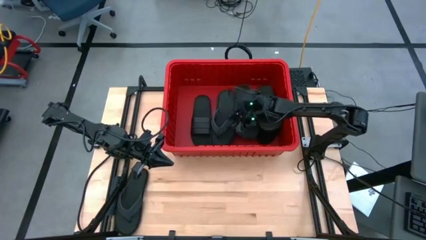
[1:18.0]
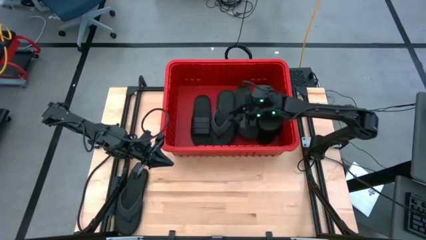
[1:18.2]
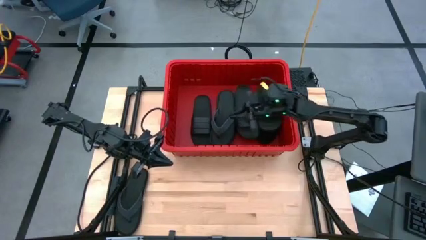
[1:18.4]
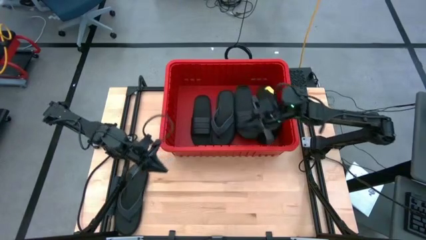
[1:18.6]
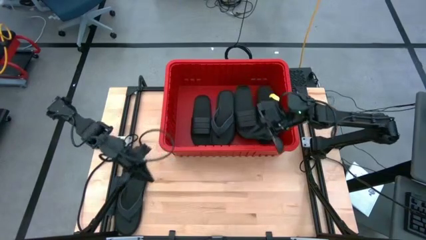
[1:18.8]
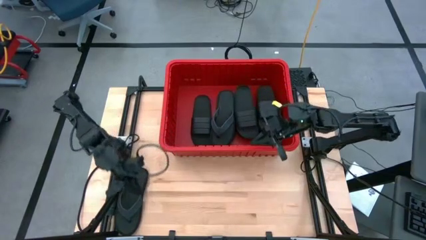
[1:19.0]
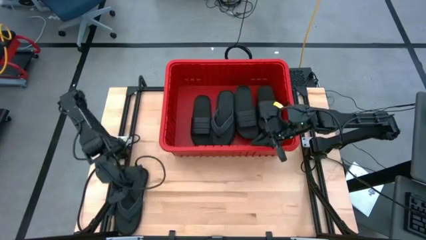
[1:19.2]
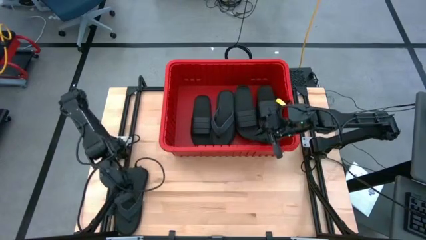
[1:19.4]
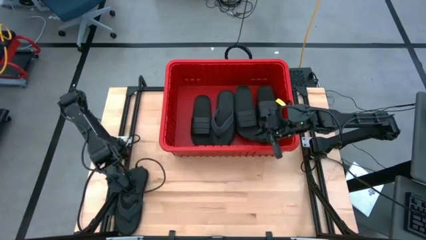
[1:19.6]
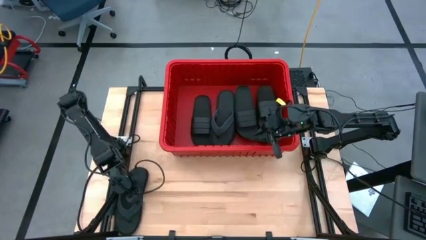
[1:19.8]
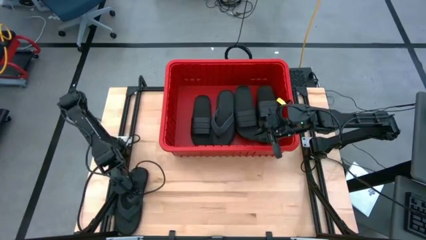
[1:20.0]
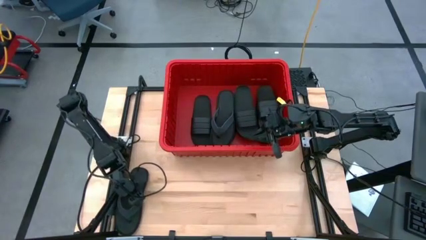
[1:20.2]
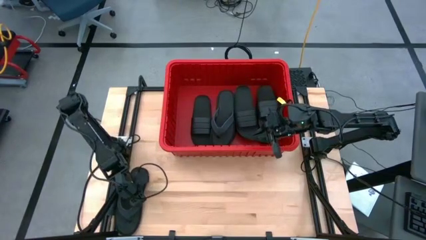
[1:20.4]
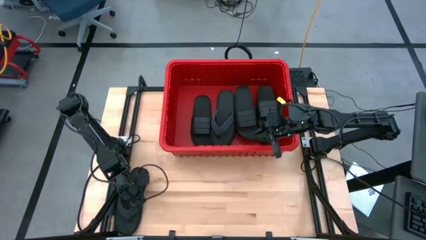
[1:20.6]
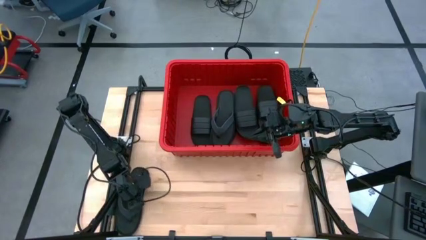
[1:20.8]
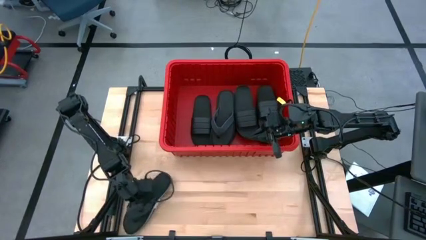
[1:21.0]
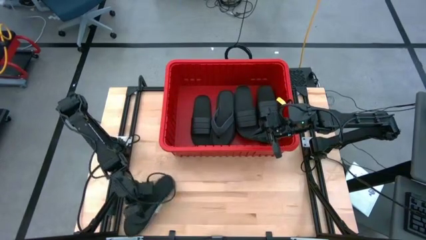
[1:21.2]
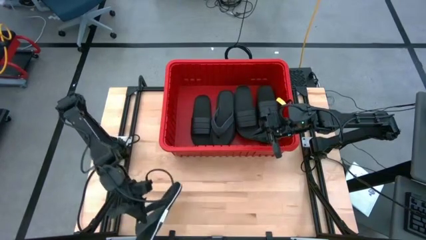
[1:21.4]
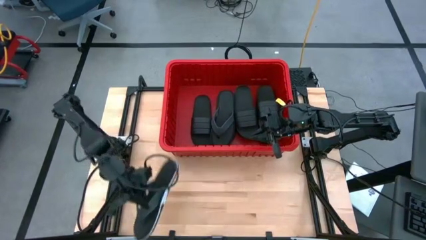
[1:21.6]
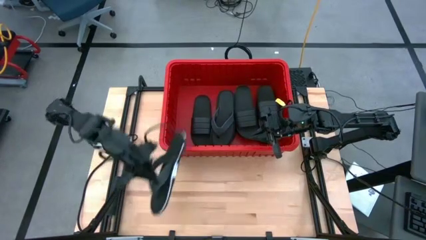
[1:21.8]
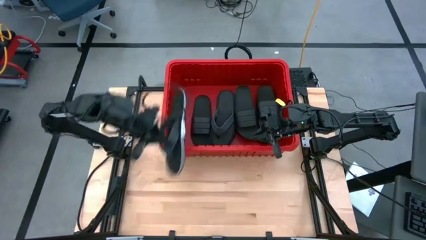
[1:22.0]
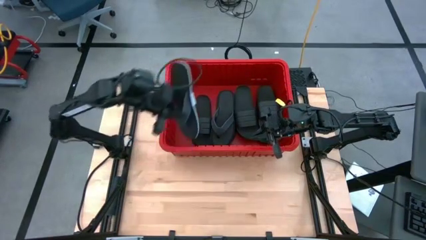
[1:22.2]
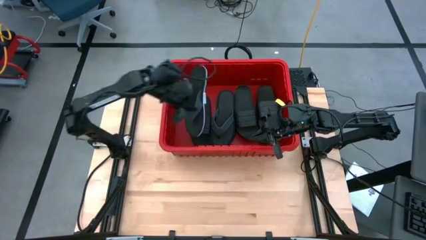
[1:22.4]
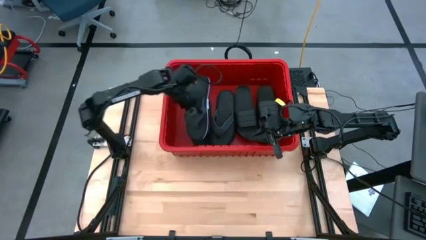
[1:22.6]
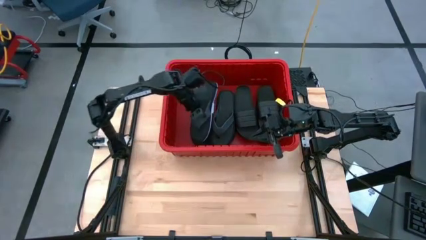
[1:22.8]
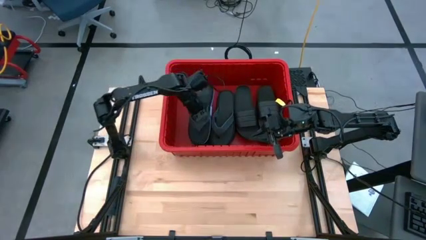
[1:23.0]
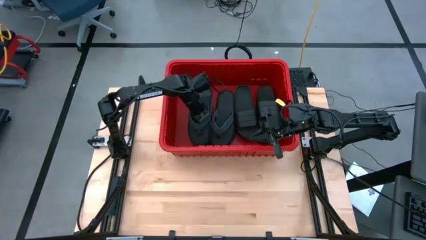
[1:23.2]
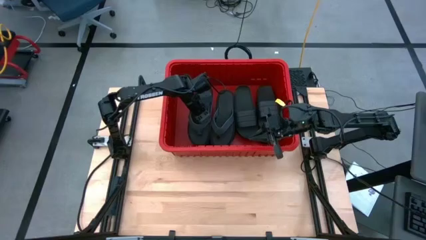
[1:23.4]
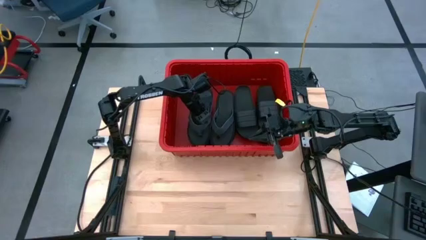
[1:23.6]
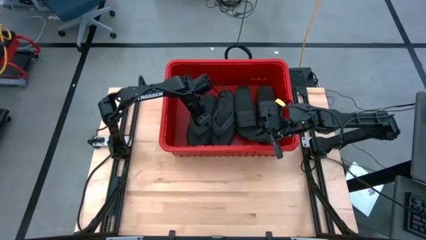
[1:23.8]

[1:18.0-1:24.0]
Task: Pick and place slides into bin
Put the black slipper into the red container

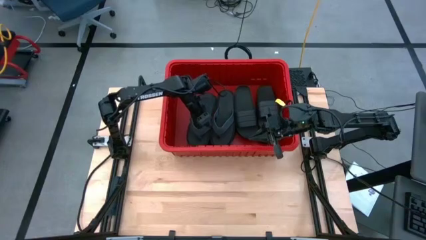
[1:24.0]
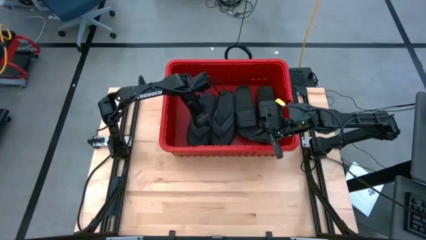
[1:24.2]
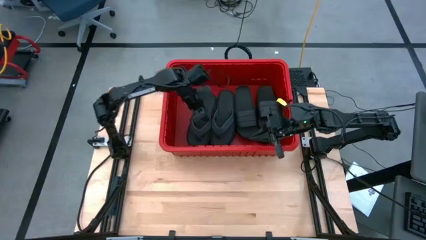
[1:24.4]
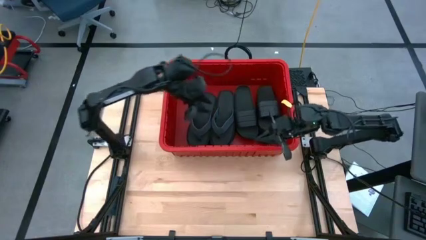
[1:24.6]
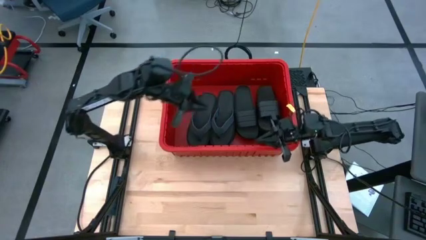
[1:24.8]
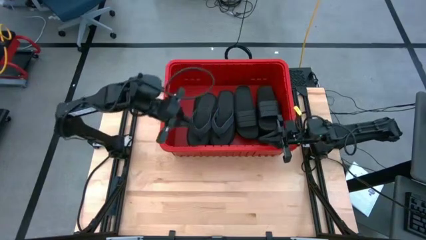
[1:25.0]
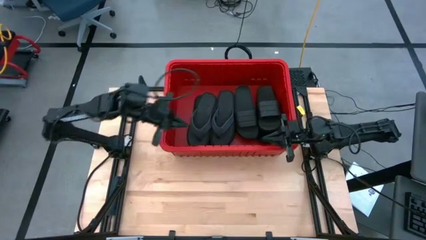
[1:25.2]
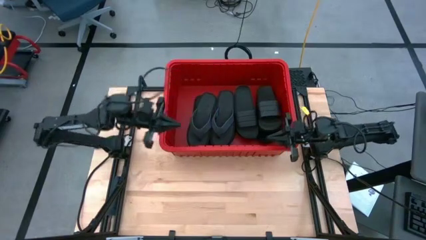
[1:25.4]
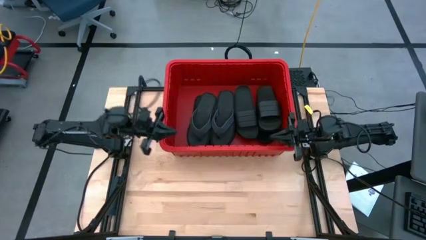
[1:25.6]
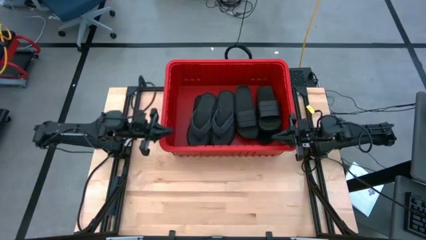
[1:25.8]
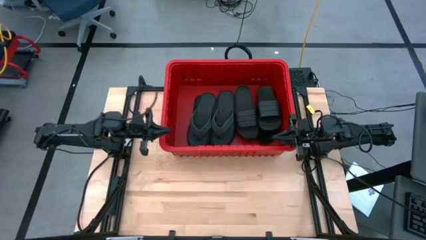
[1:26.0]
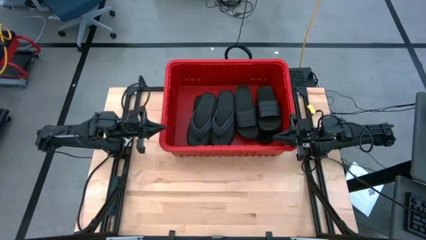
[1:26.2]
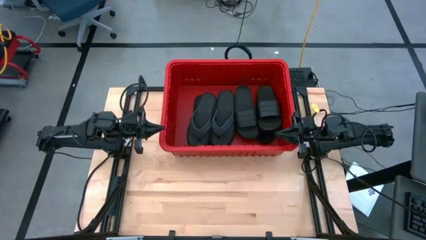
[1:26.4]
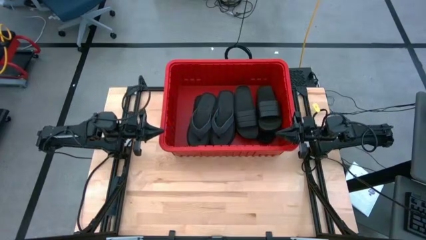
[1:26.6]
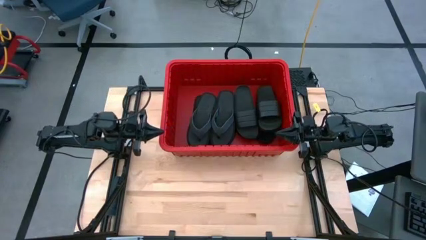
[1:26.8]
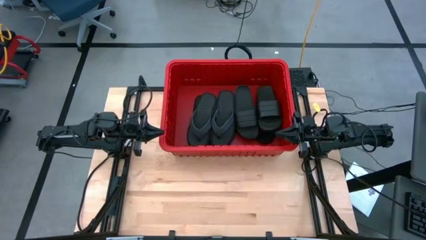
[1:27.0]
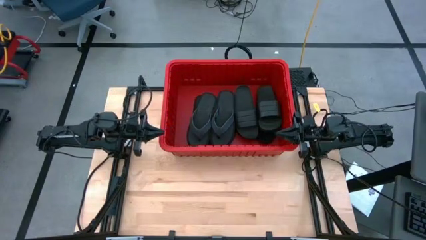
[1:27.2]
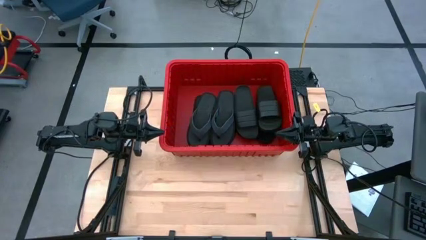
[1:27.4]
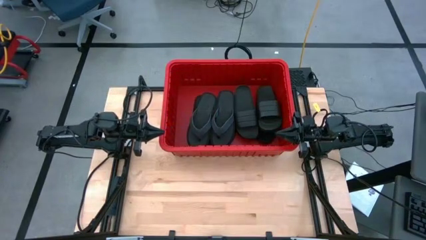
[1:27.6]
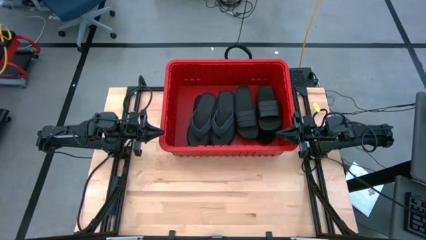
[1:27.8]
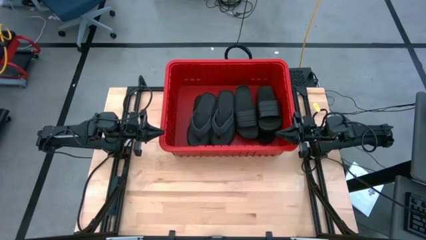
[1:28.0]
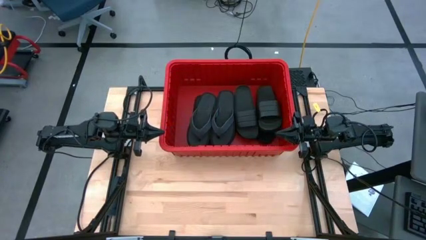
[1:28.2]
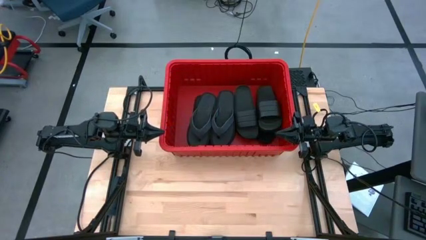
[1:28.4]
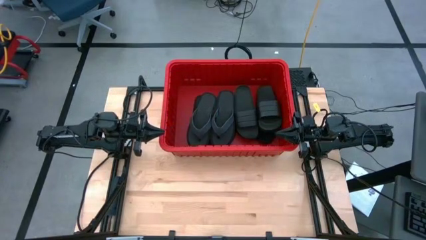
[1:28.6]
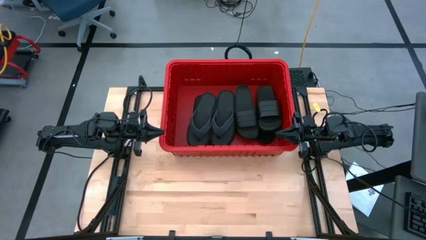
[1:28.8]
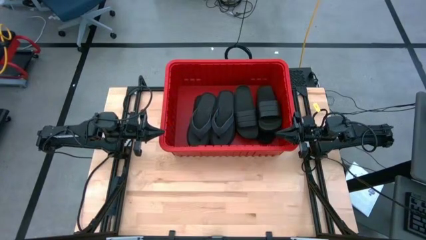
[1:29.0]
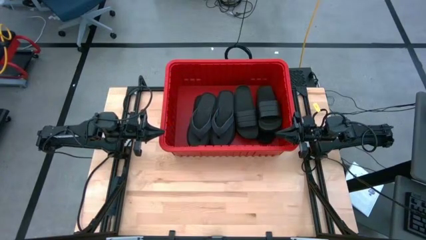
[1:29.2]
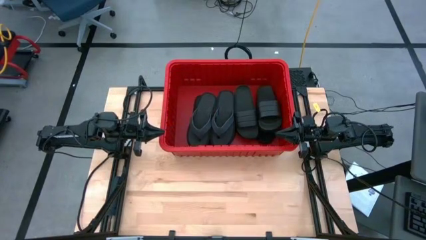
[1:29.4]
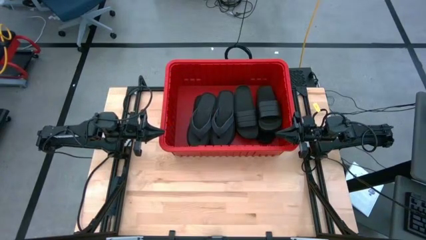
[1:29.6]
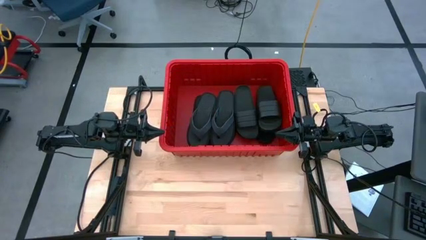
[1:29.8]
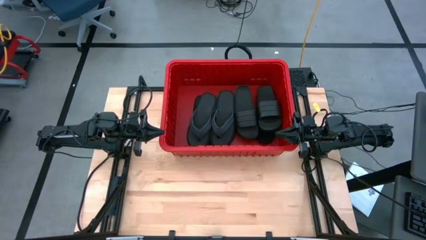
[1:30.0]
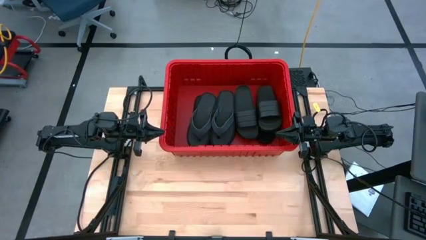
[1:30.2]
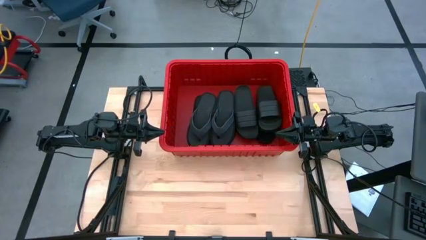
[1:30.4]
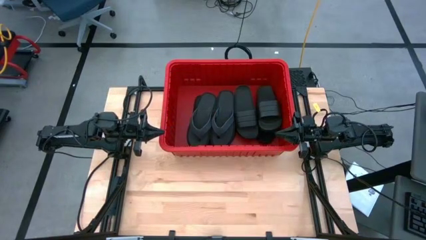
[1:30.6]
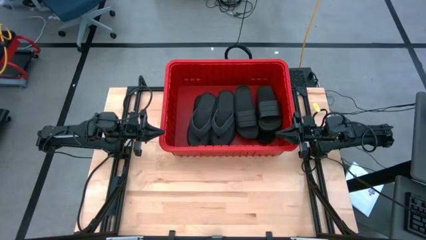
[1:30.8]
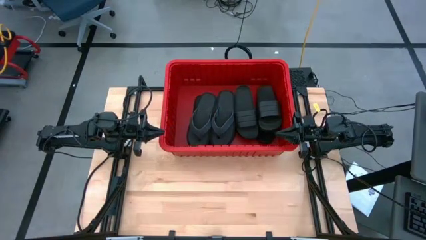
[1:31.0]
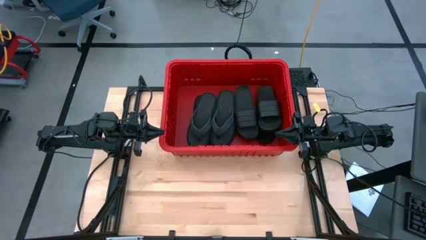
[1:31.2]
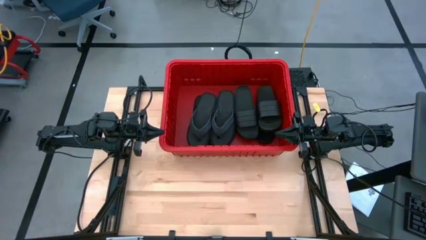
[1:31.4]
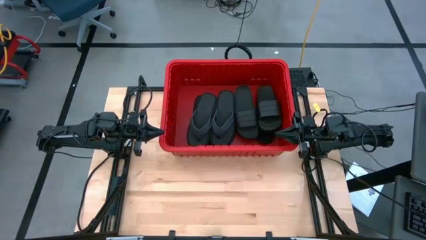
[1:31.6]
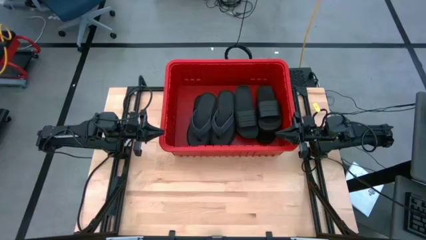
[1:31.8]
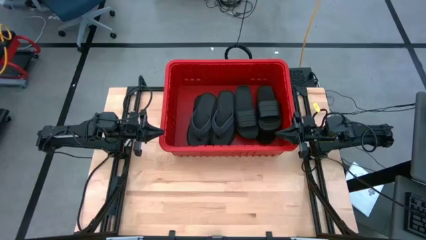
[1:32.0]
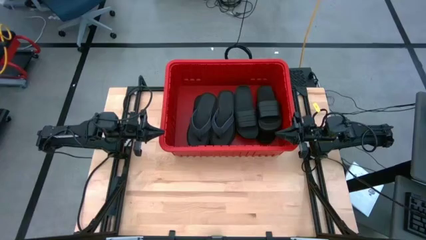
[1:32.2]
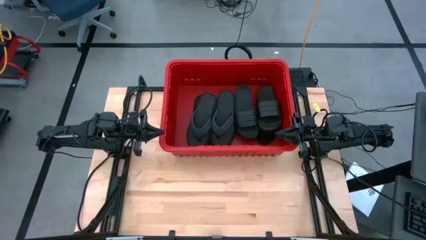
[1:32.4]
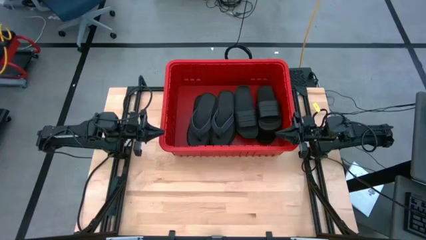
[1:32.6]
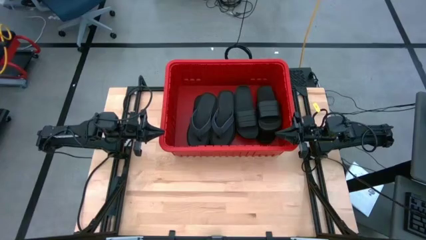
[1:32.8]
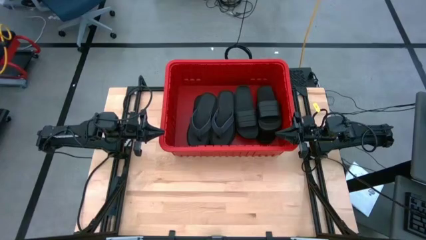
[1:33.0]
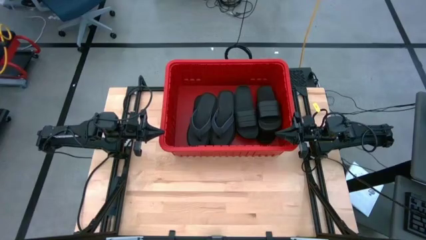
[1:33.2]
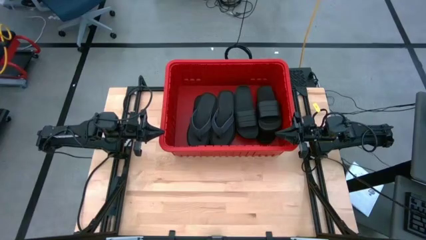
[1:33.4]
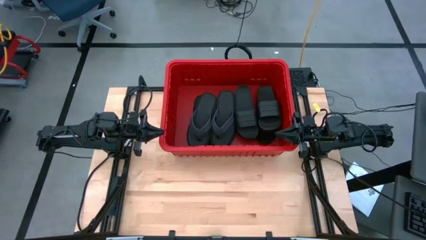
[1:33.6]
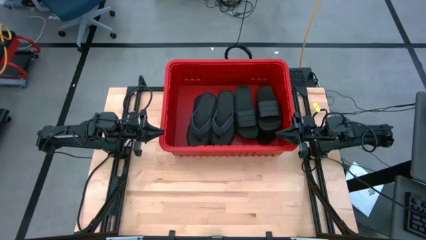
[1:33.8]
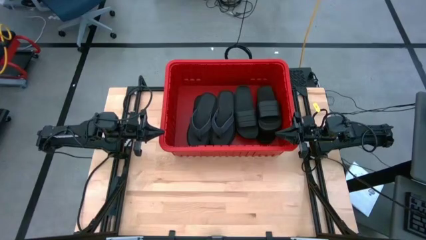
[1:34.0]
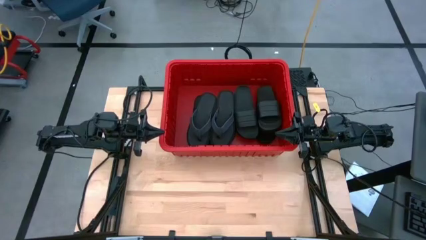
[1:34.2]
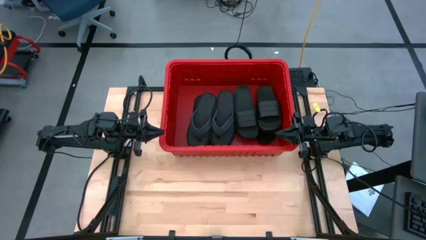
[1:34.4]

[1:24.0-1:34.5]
Return to Home Position

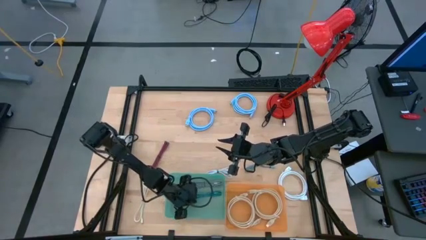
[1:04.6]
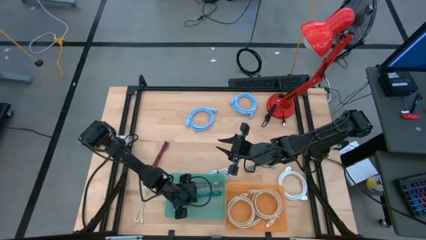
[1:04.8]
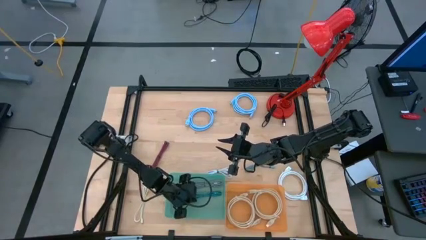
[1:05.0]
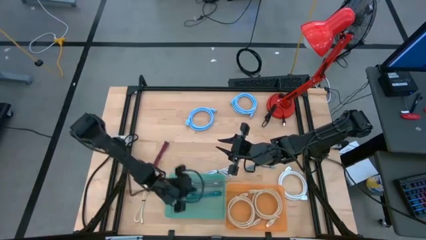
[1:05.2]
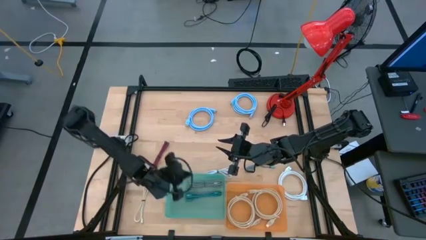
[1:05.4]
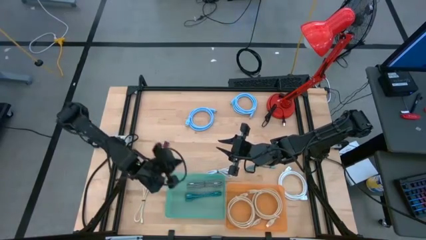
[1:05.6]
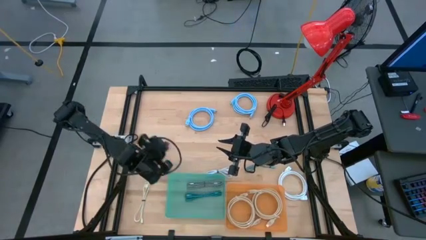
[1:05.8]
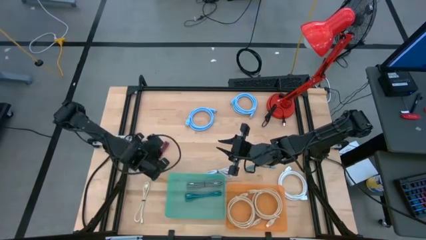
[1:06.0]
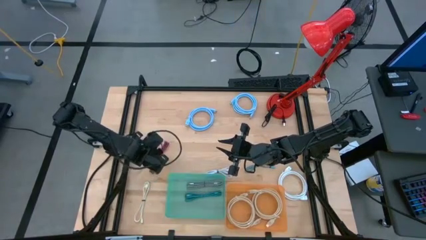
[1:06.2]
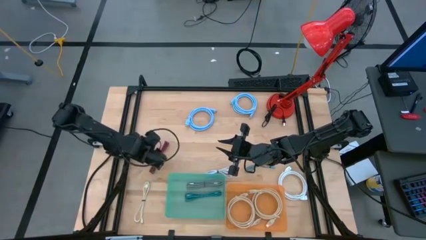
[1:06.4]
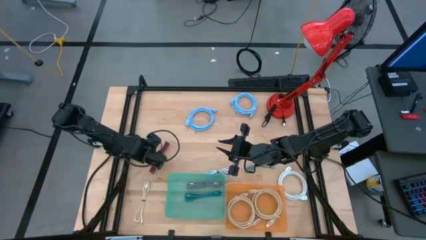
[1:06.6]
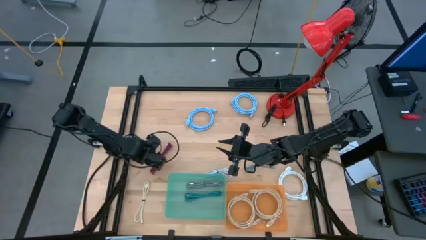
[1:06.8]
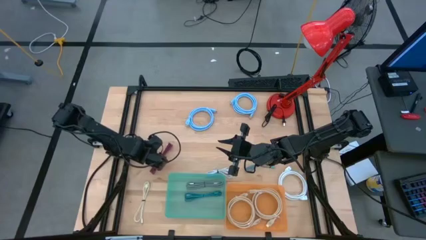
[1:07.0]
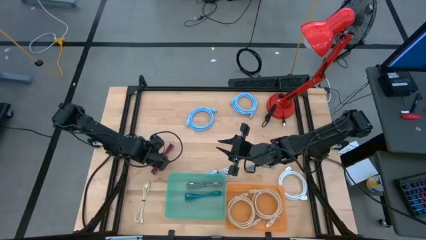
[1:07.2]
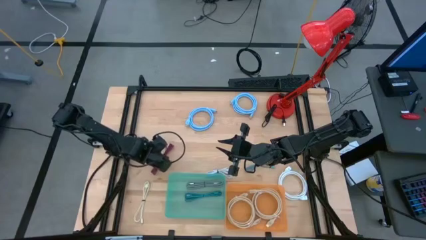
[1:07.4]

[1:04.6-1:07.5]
Task: Pick & Place USB Port
Put the pink charger cable into the green bin
